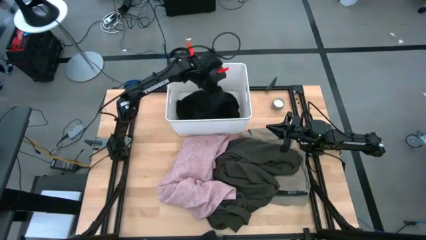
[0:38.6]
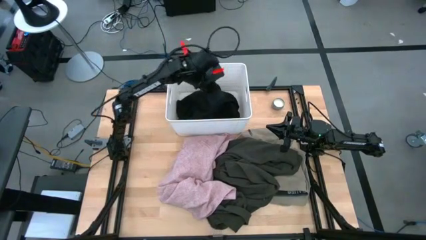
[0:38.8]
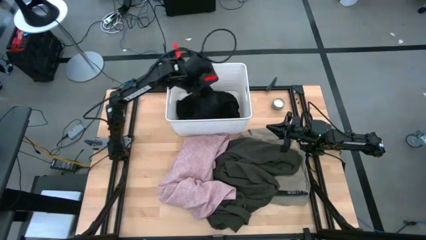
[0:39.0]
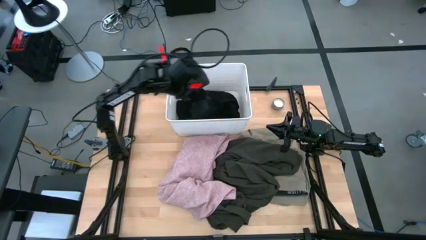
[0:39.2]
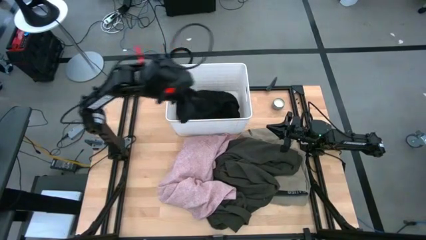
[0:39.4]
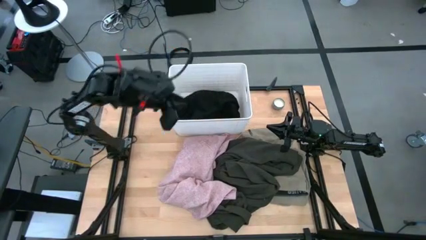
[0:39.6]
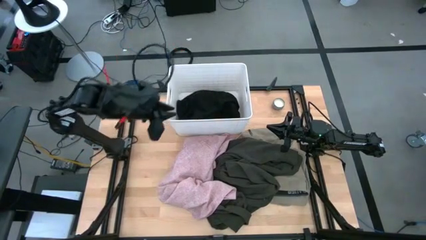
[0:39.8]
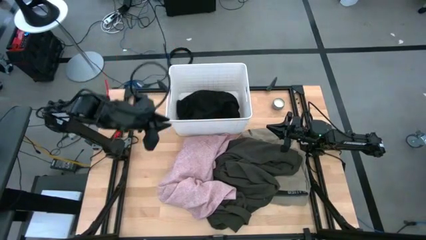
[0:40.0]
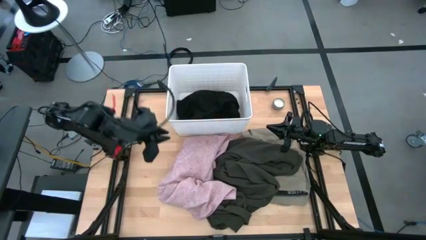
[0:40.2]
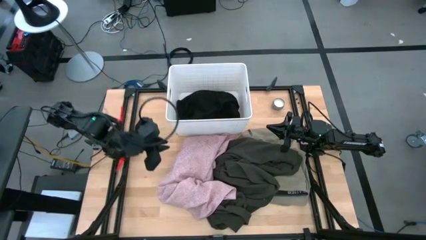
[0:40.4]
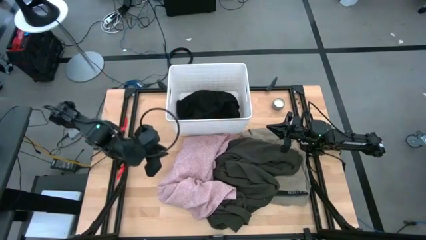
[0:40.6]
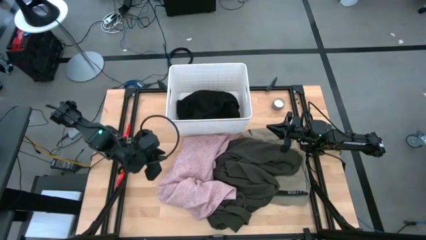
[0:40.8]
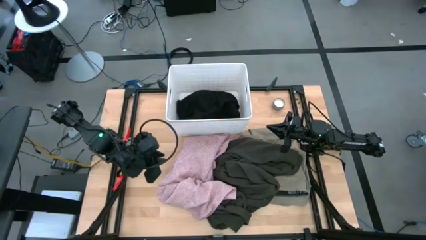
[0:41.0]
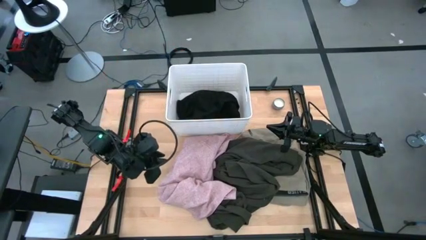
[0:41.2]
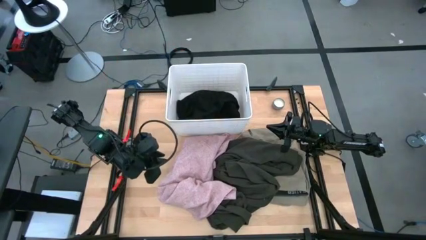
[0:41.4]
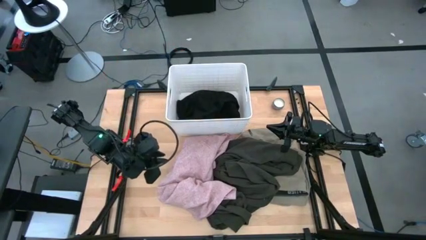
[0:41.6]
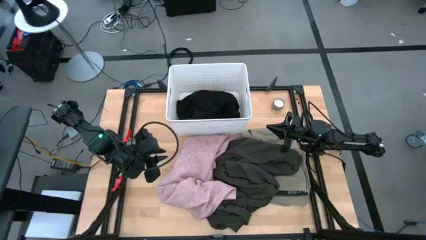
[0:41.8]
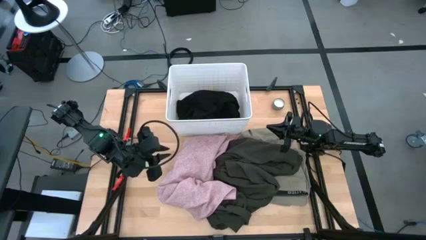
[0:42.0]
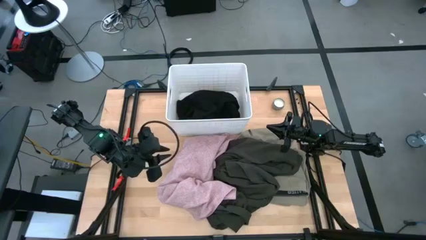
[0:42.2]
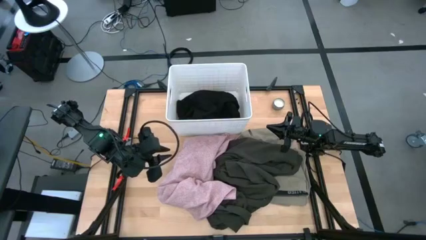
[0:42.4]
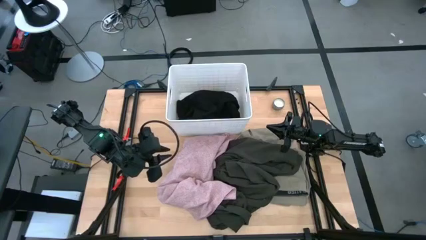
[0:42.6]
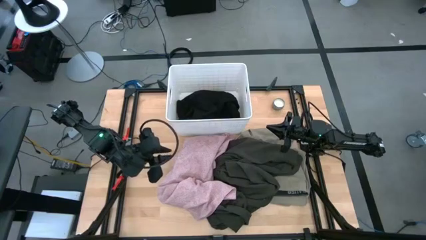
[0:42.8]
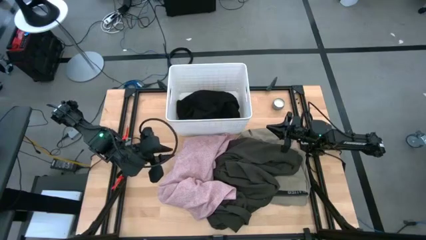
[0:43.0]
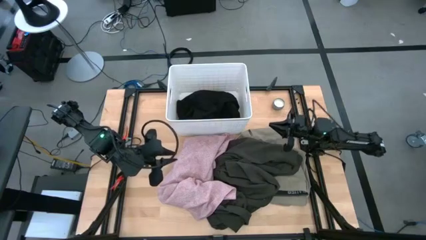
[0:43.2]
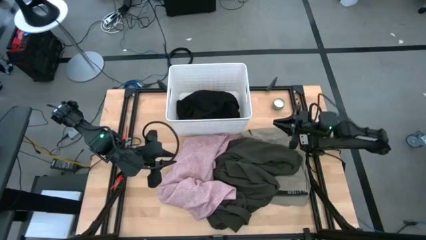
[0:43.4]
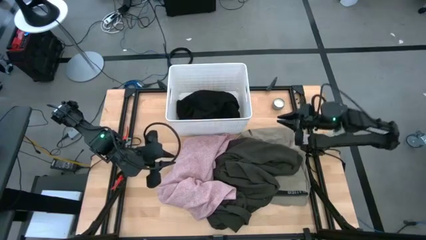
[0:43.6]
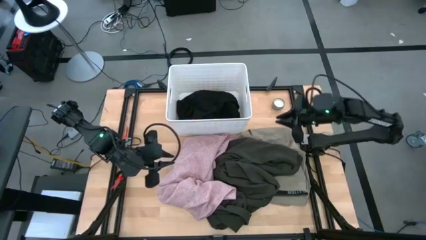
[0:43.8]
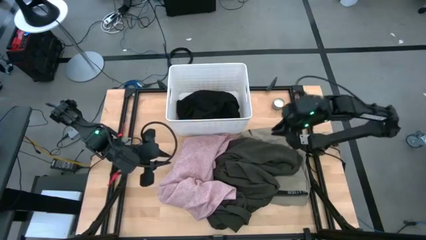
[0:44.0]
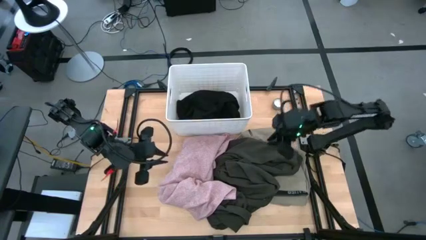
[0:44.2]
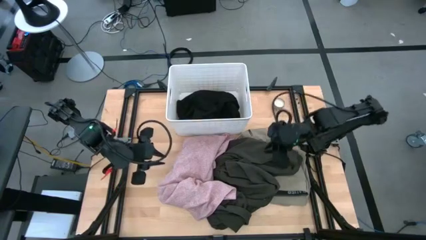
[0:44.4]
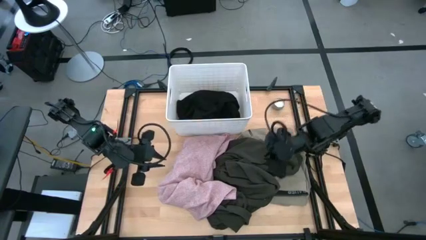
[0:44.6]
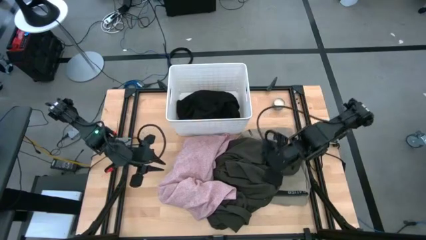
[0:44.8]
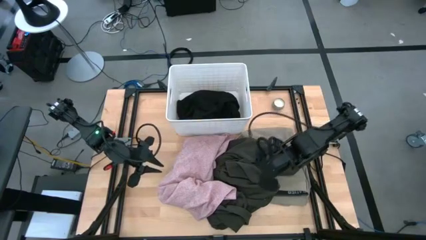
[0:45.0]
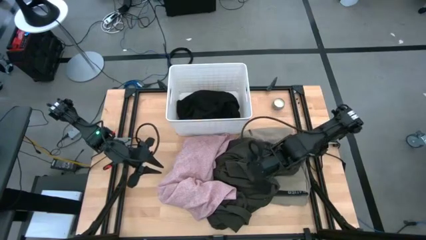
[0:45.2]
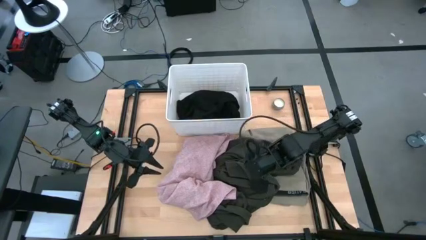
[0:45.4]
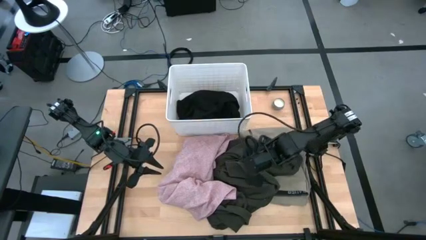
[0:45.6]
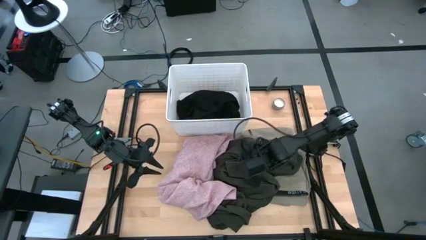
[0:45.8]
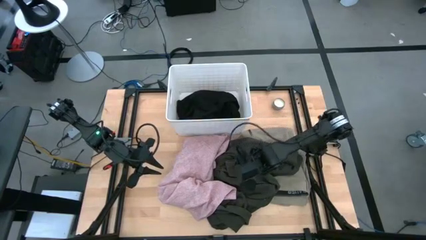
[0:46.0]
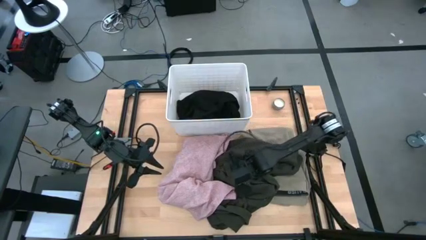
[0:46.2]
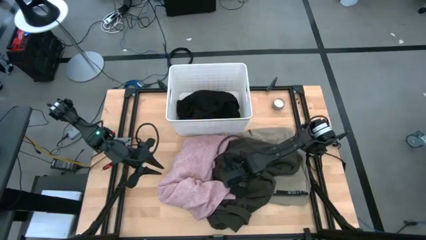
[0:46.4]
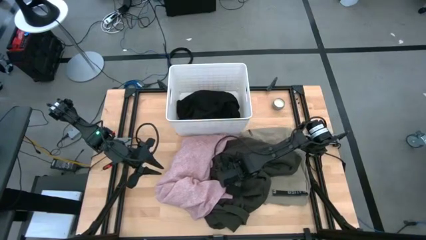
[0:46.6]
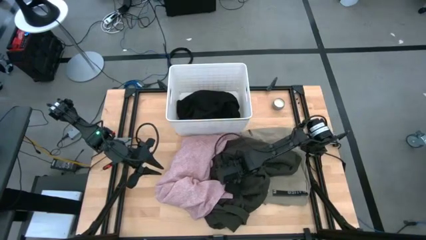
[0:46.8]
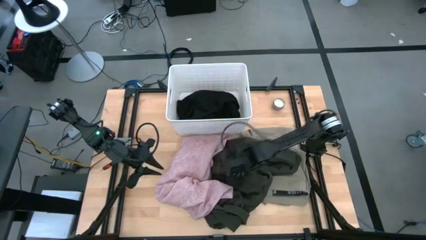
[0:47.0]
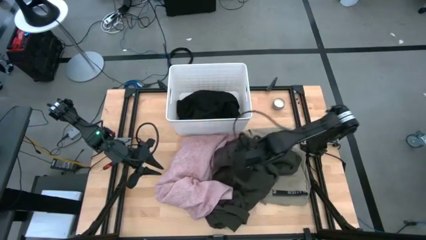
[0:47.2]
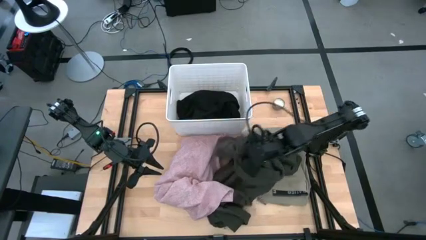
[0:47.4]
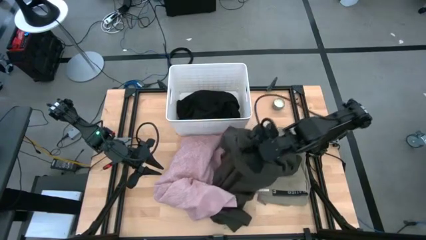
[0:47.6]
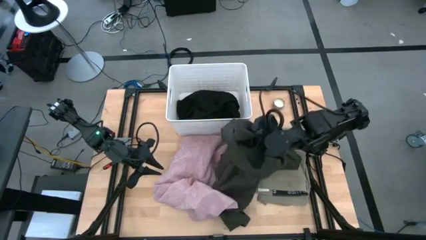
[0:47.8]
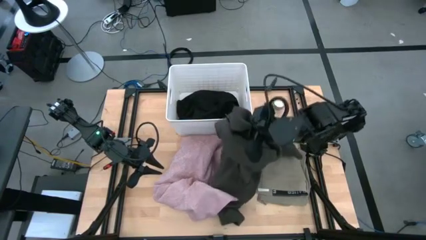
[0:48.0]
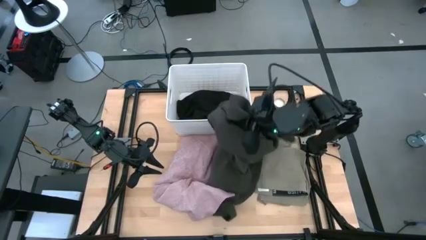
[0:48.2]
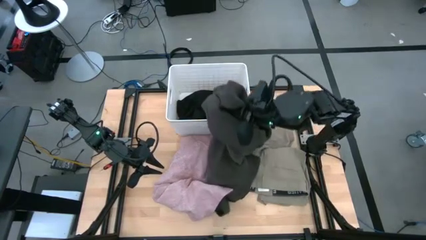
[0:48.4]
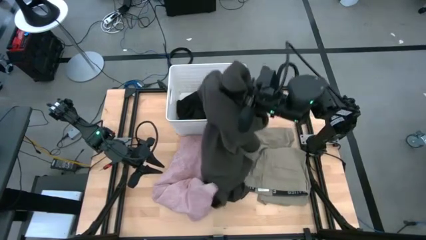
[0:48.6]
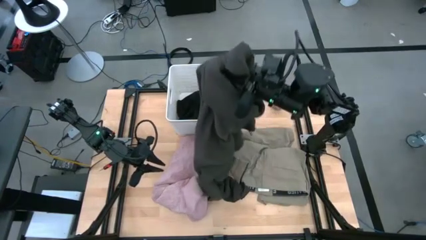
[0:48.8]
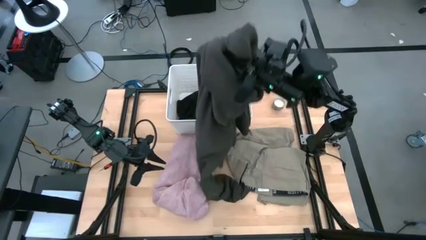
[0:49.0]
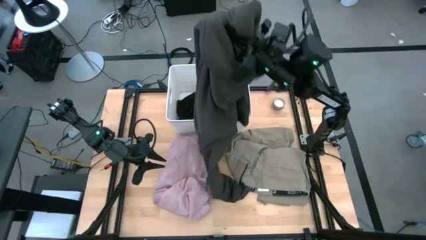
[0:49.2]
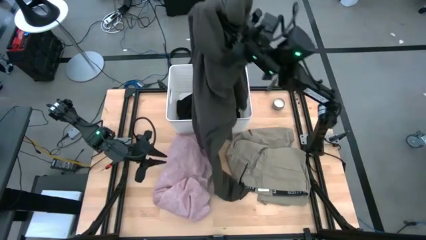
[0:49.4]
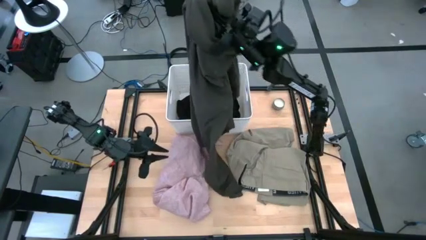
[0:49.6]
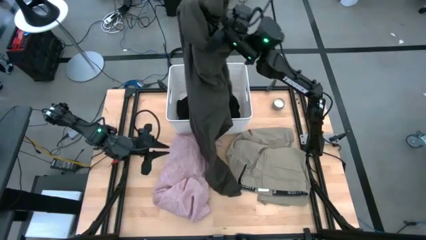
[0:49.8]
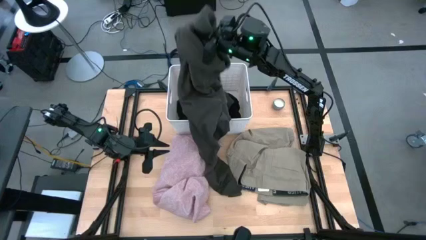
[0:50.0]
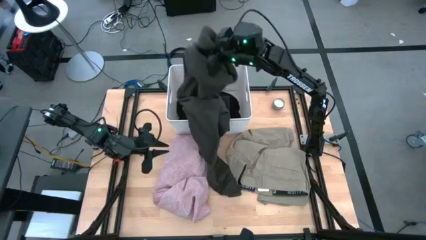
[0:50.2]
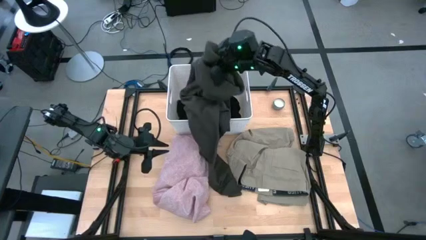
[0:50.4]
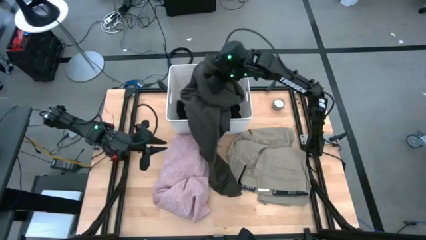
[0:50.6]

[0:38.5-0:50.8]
Task: Sort clothes
Put the green pants into the white laundry organizer

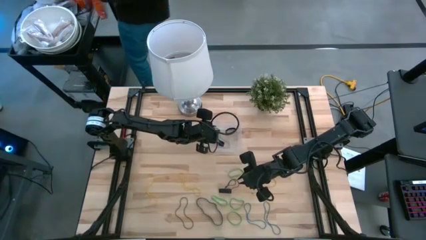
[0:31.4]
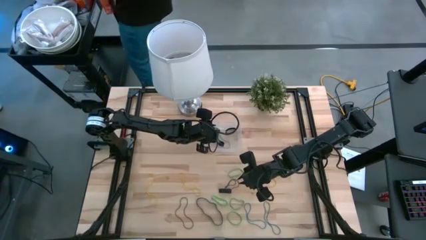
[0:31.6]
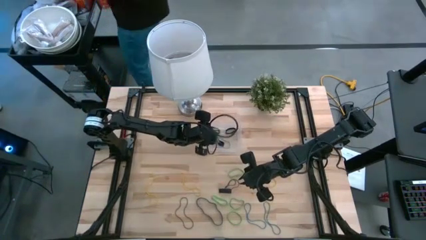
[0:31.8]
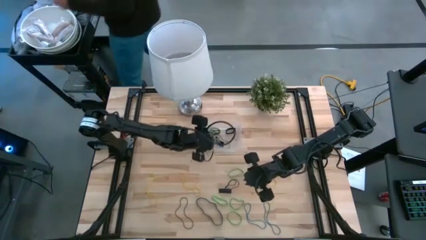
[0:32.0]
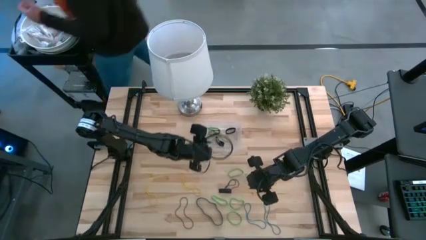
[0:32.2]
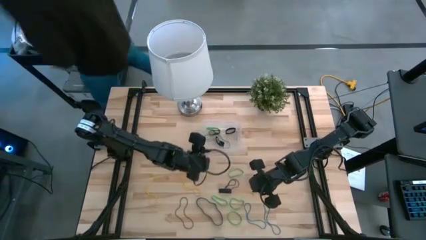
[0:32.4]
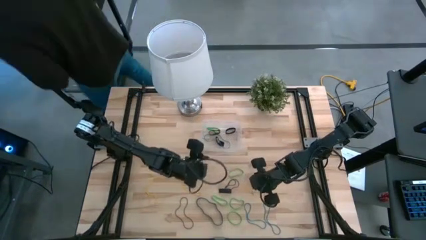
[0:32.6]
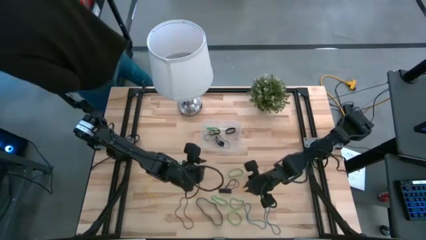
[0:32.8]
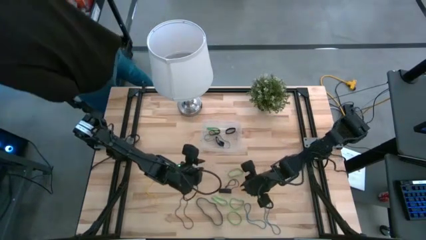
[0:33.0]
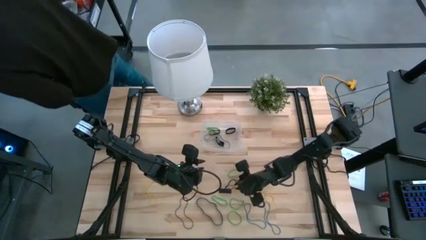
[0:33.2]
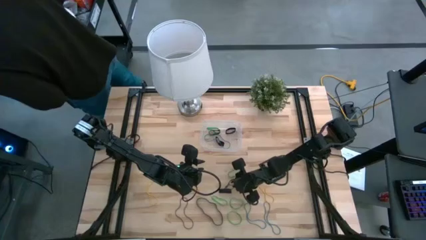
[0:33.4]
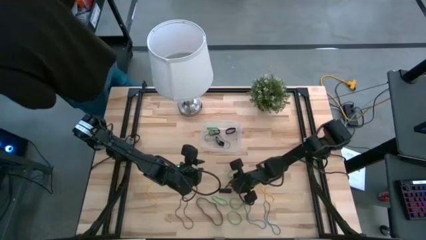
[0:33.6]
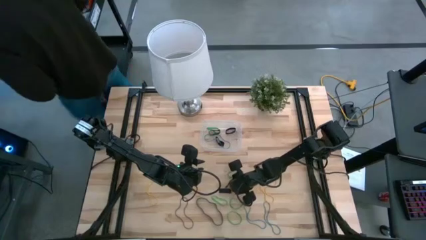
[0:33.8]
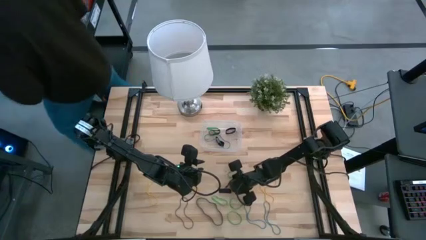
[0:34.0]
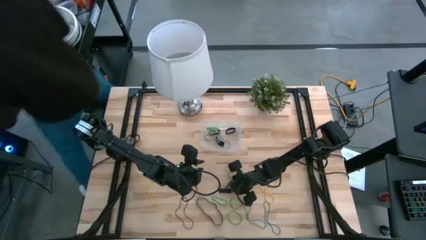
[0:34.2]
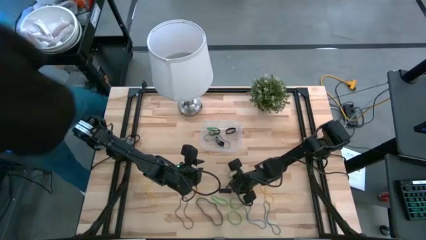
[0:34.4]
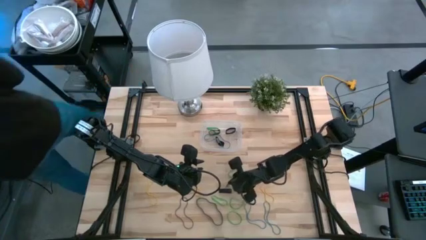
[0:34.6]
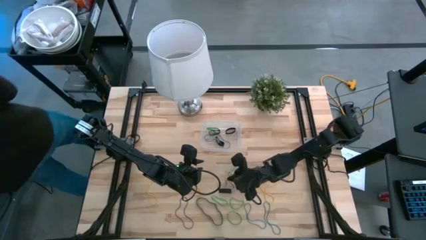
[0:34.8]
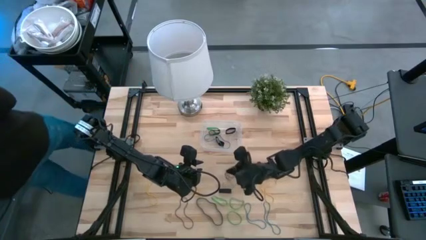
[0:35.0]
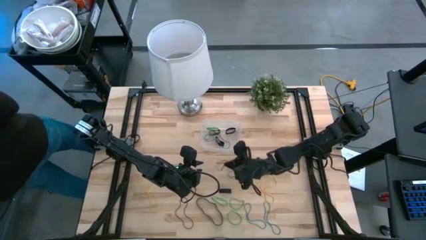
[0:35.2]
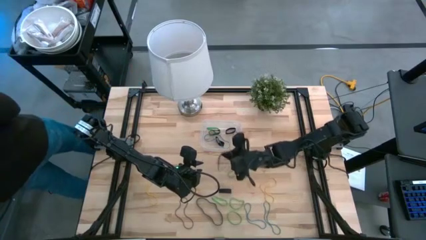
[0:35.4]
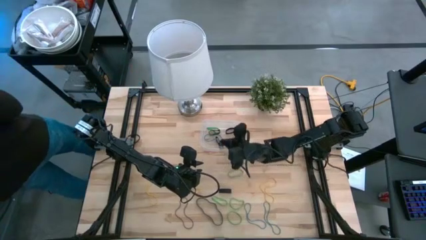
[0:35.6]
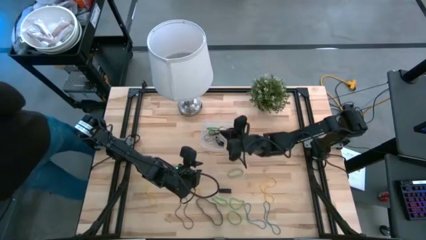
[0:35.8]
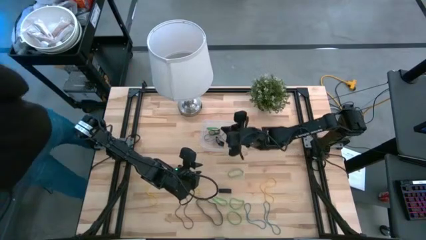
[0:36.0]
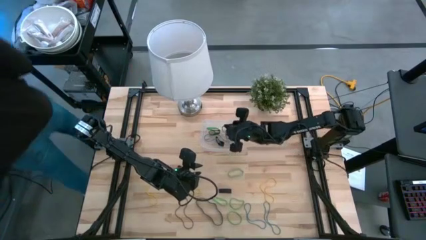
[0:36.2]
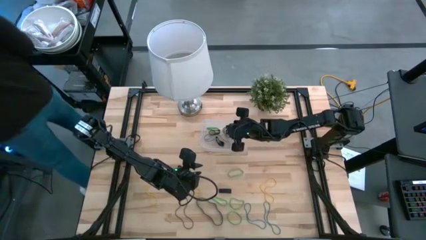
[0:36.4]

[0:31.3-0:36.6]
Task: Pick and place rubber bands into bin
Put the purple rubber band into the transparent bin
